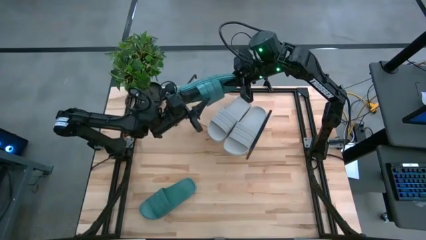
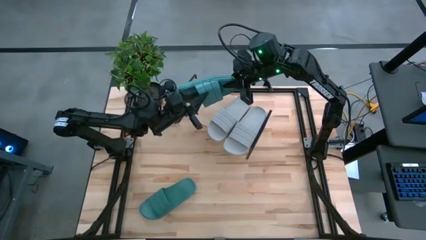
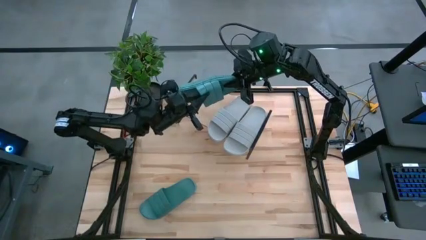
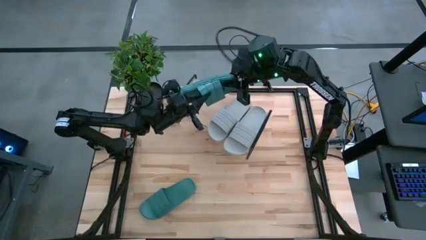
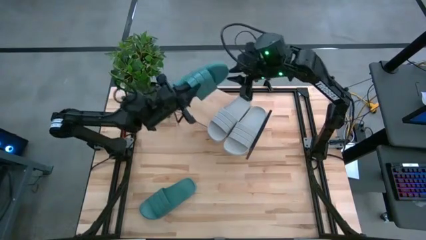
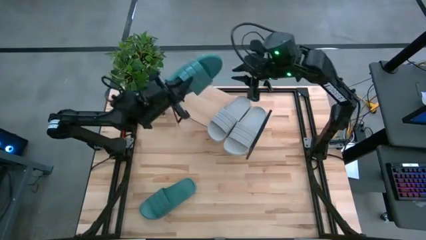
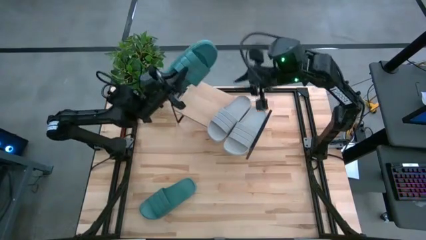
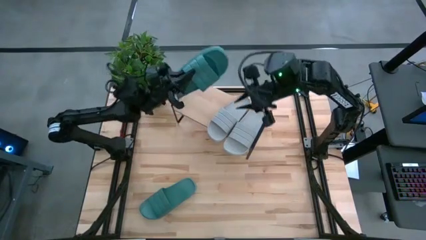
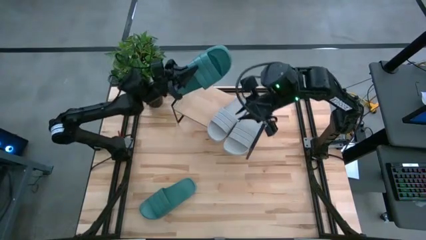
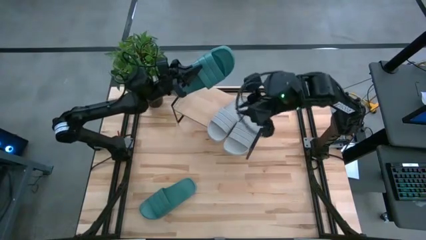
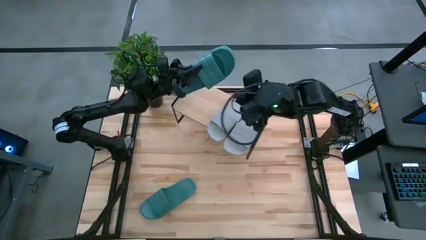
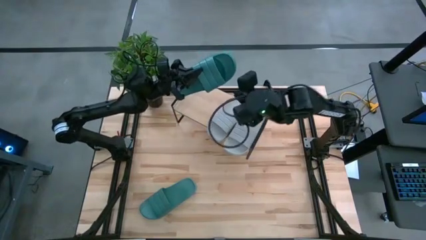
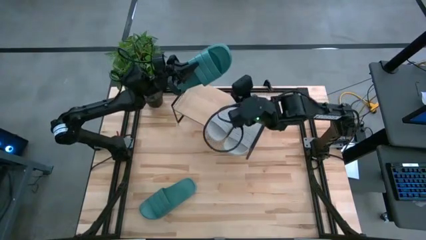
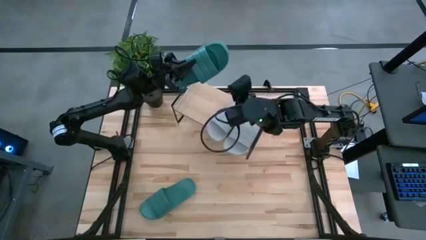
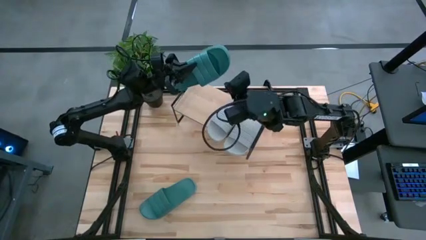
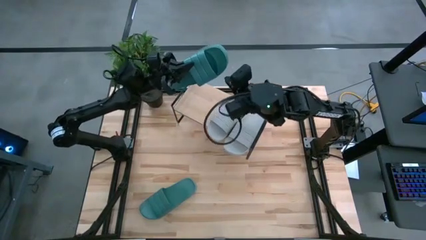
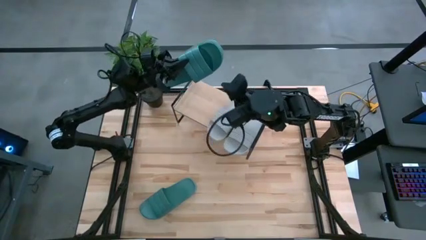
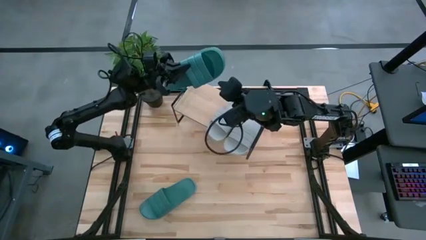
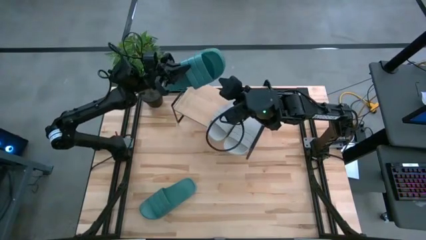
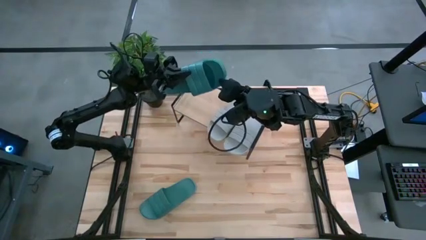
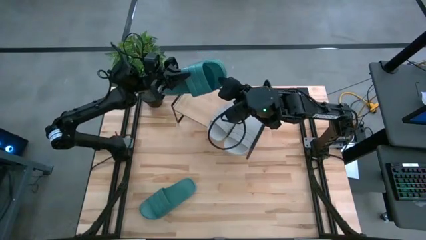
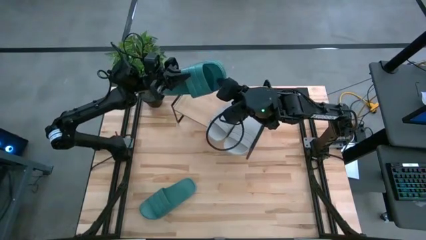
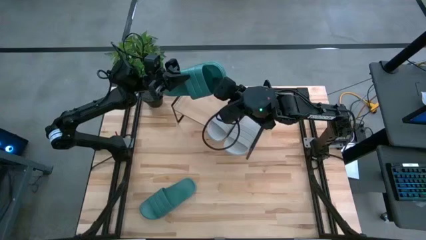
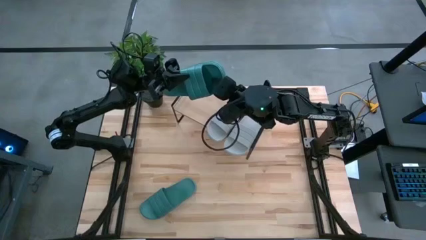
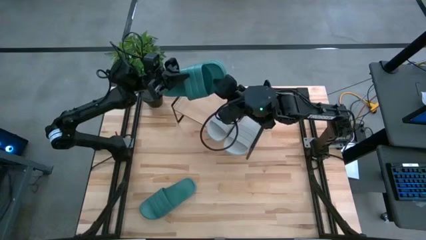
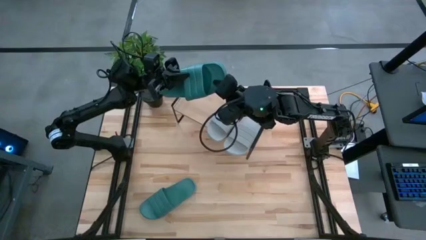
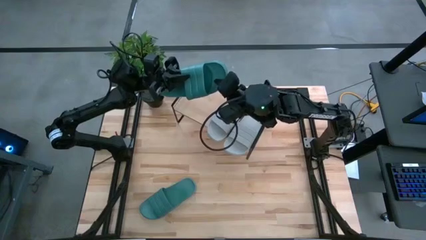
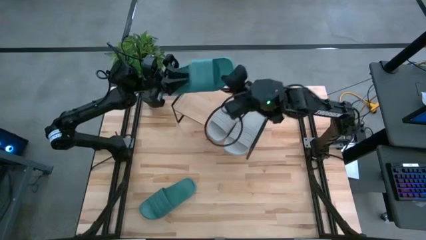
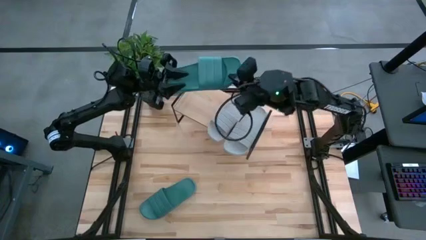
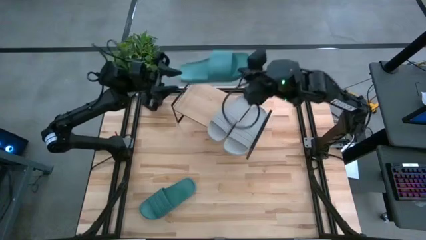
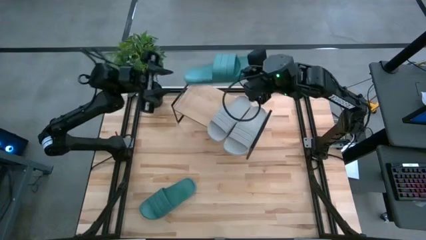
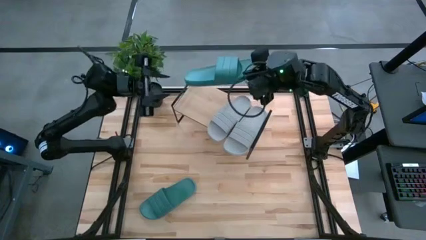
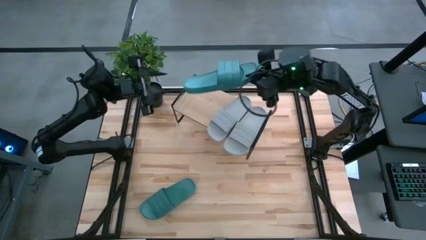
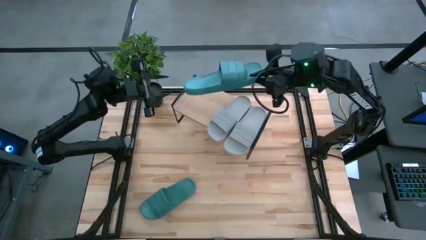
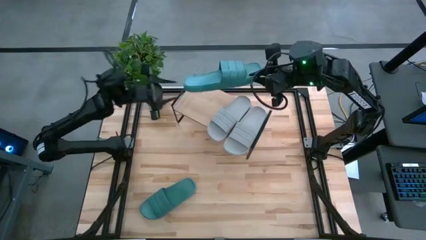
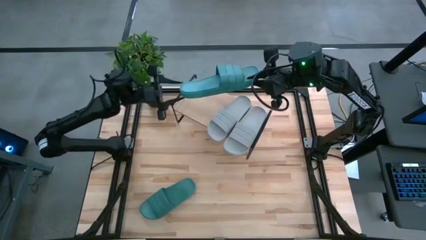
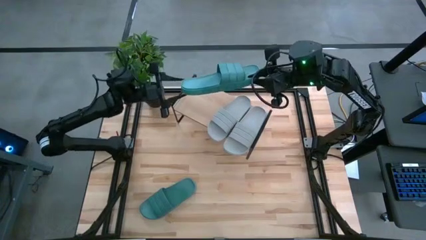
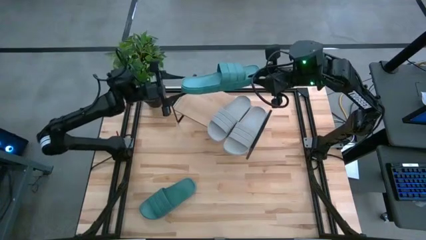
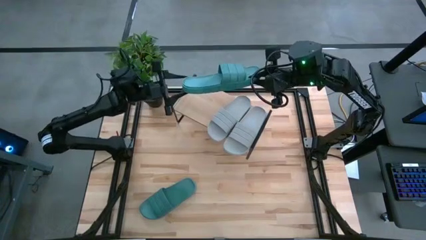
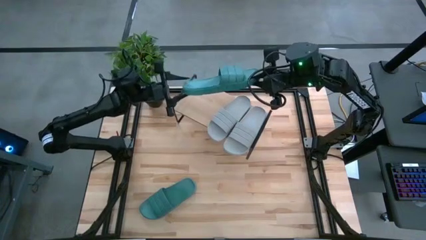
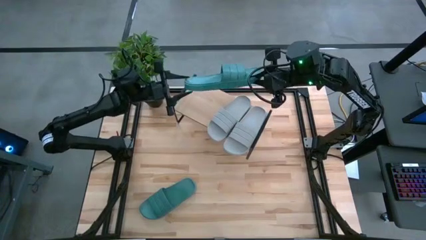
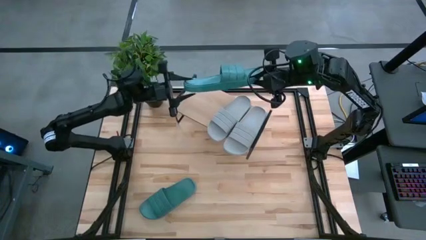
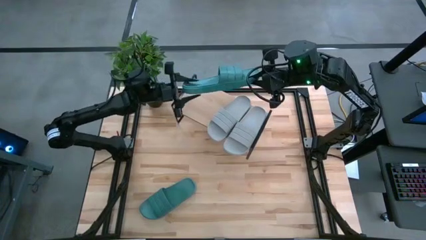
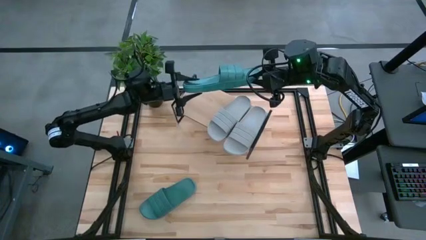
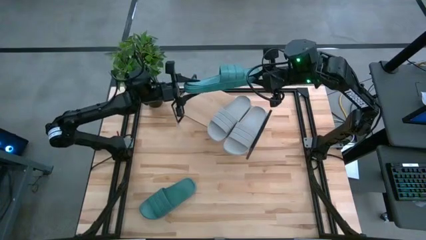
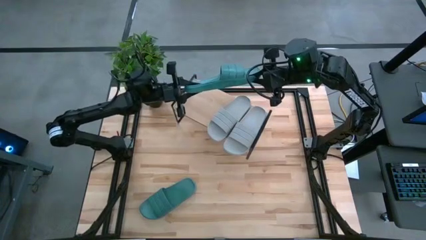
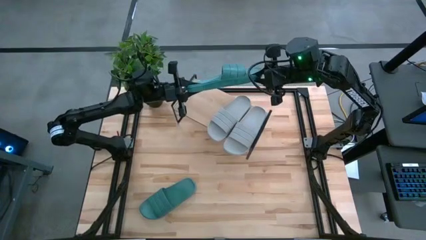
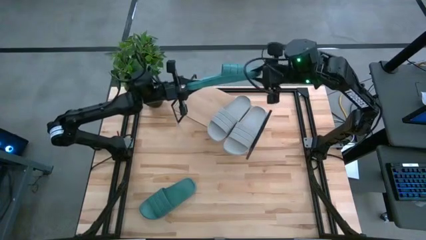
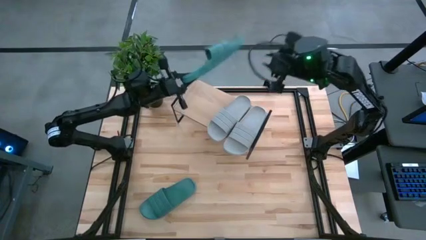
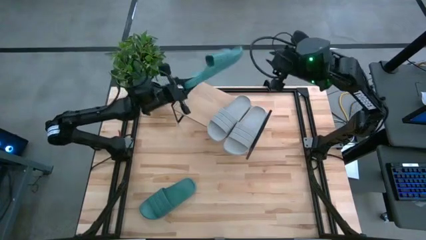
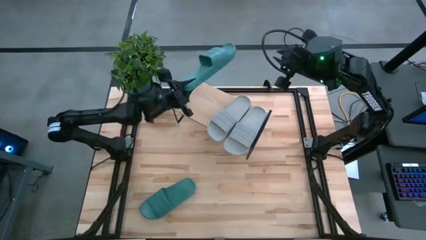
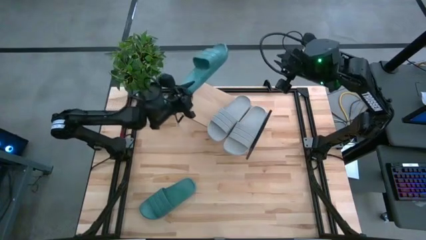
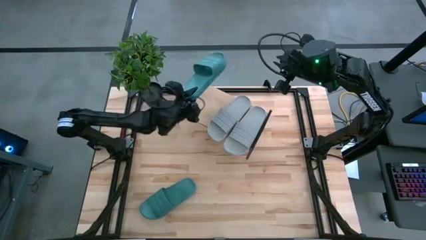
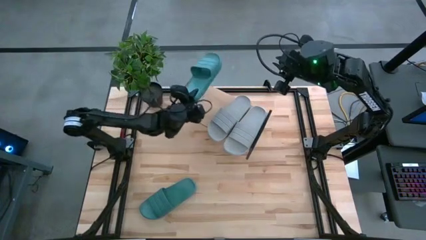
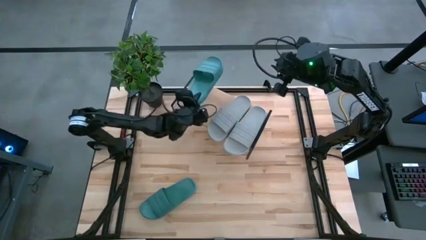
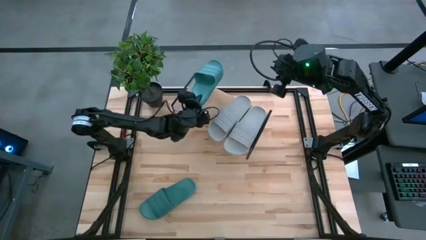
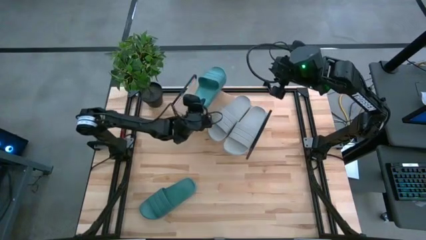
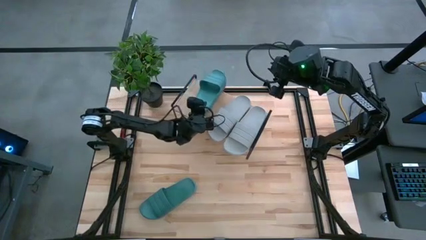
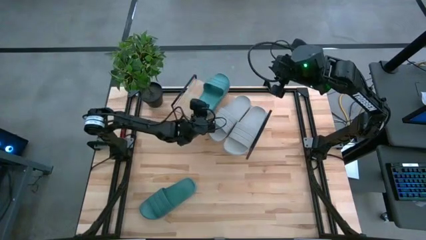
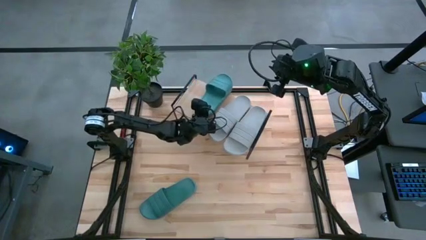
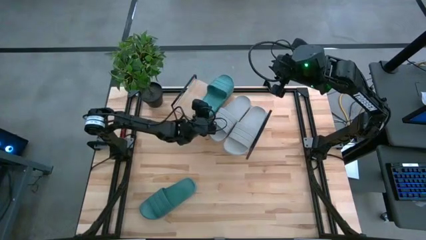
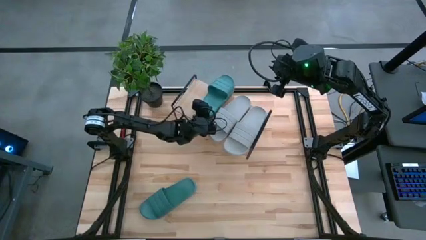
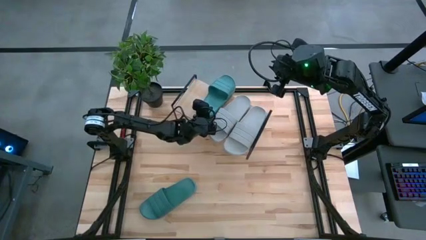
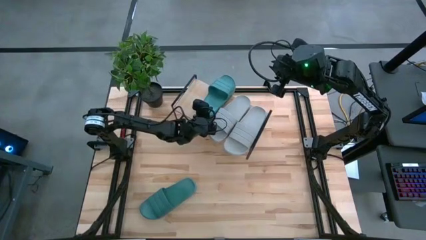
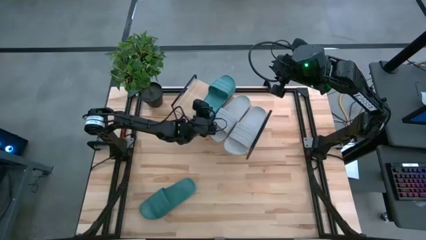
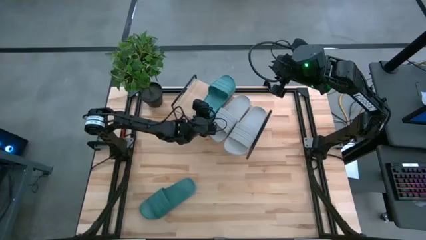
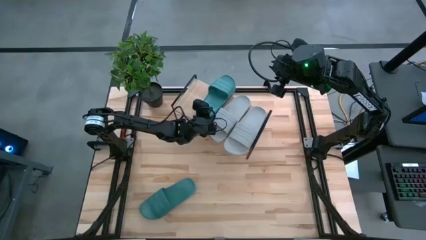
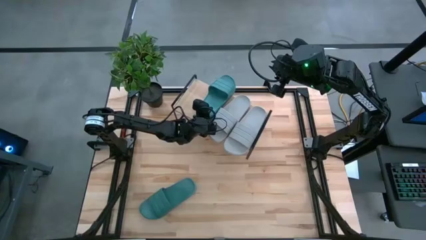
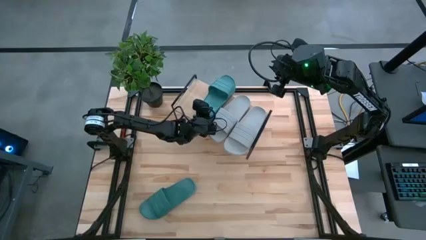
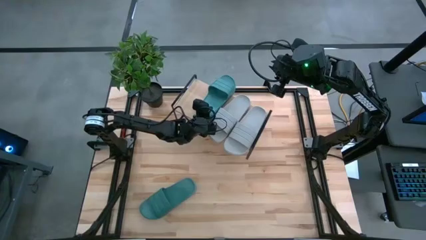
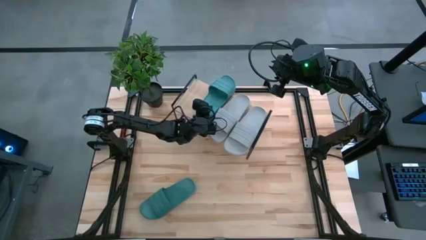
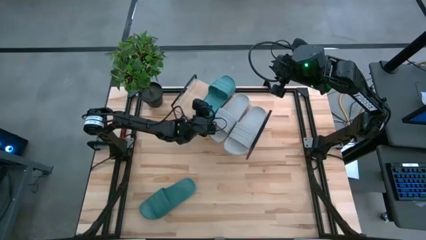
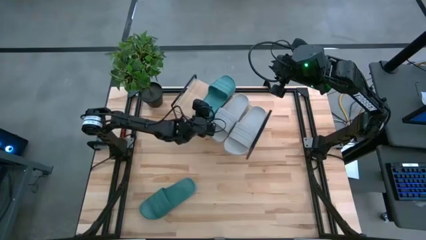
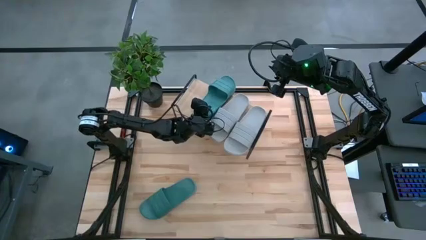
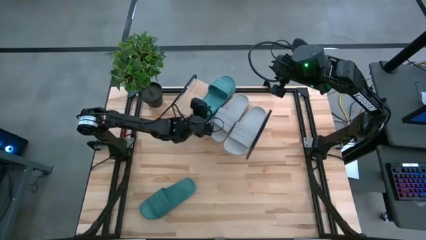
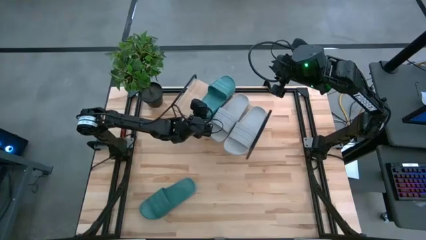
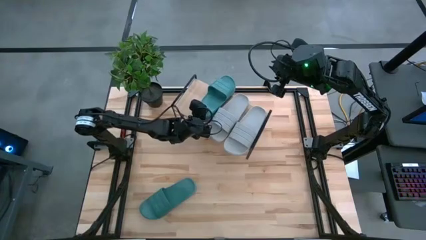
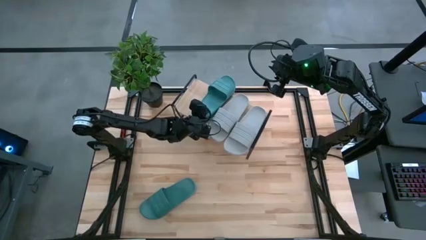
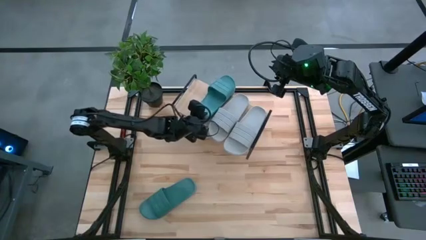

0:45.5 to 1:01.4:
Task: Pick and place slides into the shelf
Put the top green slide on the shelf
